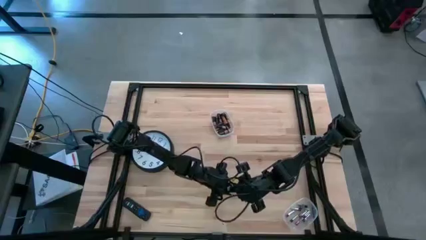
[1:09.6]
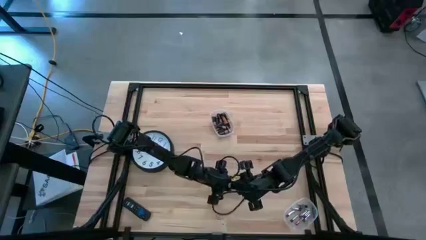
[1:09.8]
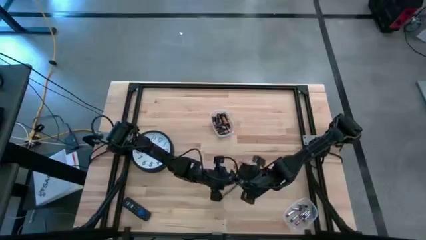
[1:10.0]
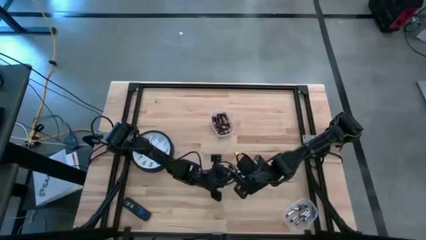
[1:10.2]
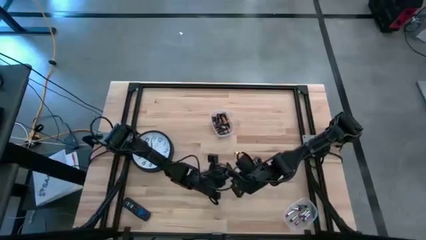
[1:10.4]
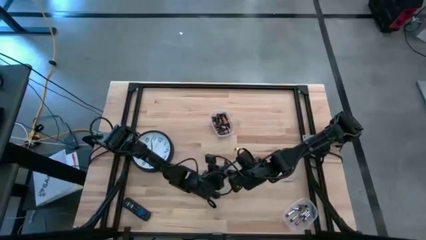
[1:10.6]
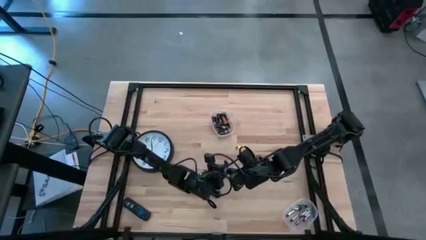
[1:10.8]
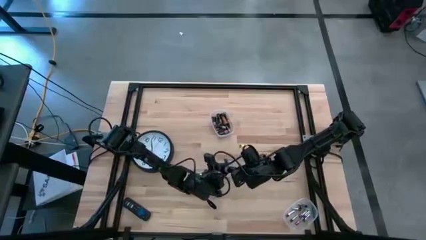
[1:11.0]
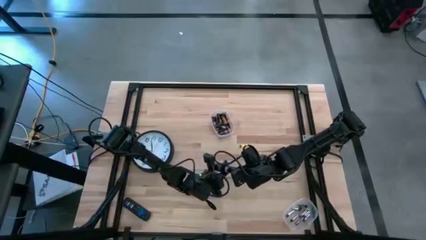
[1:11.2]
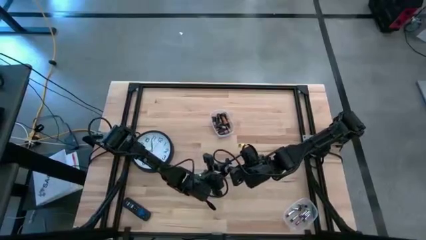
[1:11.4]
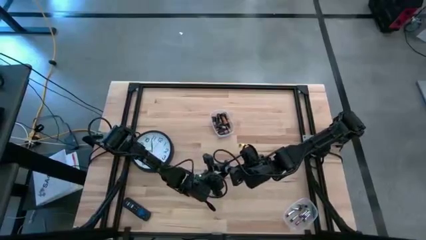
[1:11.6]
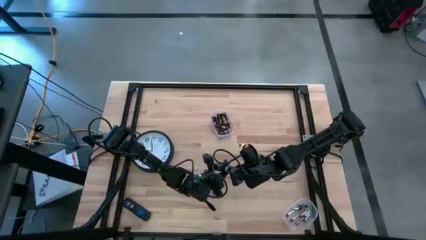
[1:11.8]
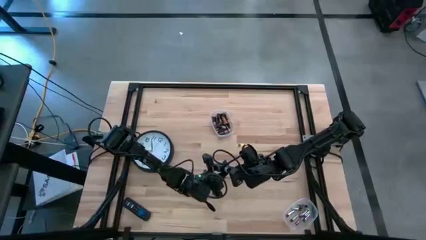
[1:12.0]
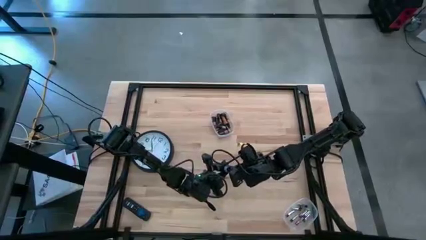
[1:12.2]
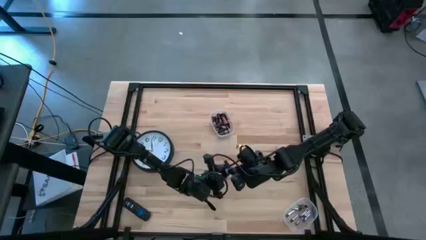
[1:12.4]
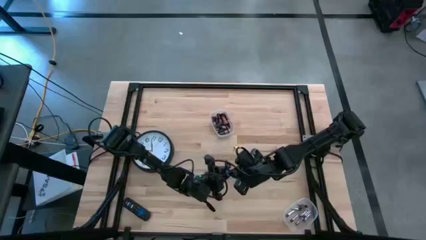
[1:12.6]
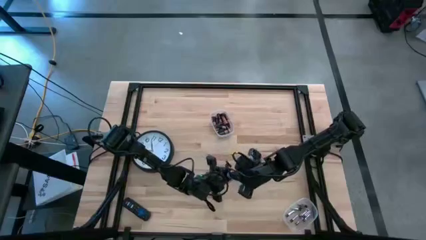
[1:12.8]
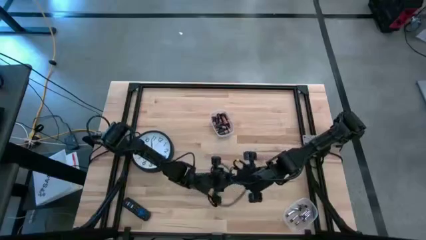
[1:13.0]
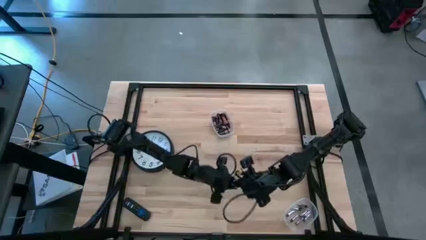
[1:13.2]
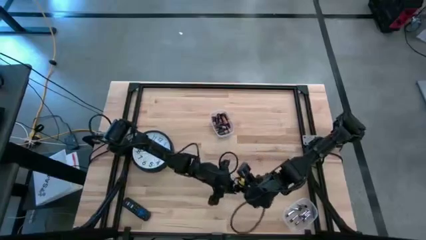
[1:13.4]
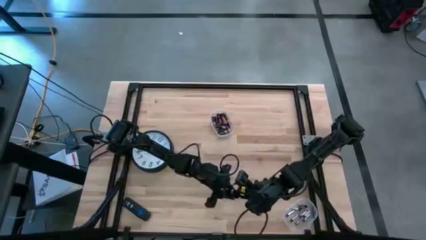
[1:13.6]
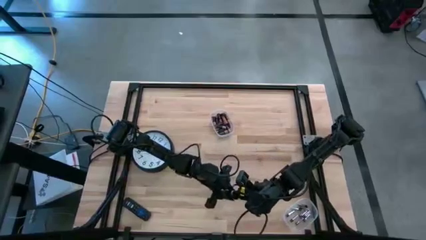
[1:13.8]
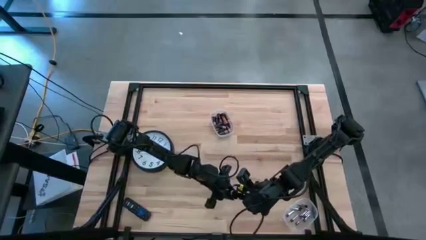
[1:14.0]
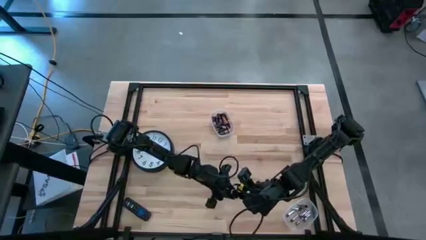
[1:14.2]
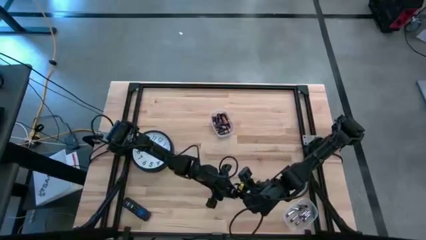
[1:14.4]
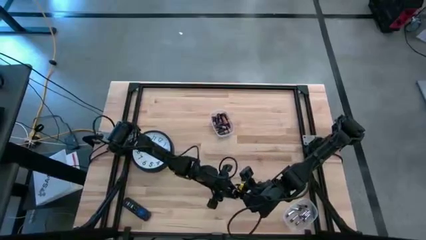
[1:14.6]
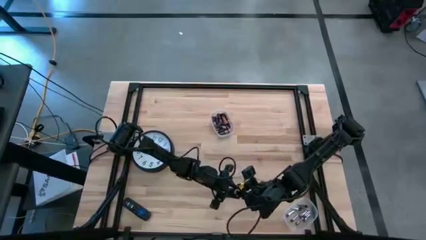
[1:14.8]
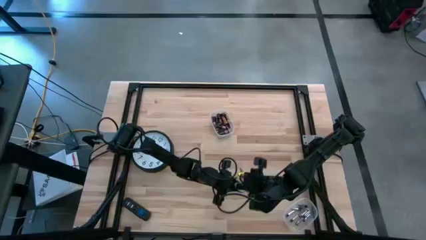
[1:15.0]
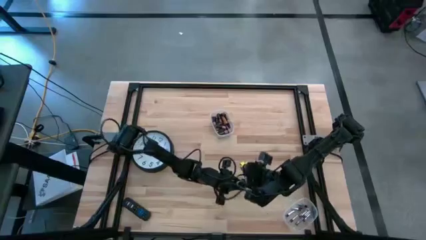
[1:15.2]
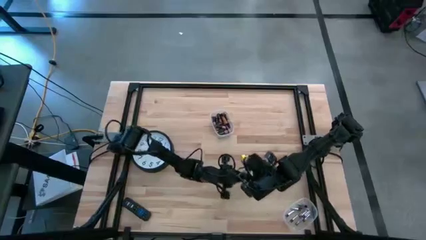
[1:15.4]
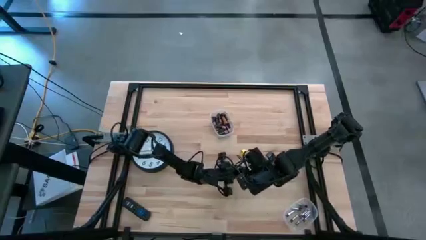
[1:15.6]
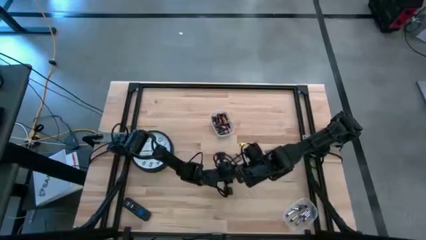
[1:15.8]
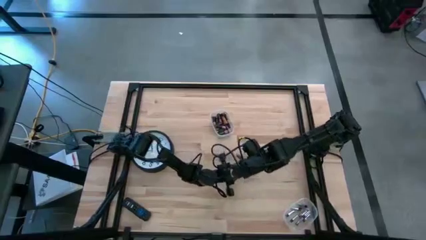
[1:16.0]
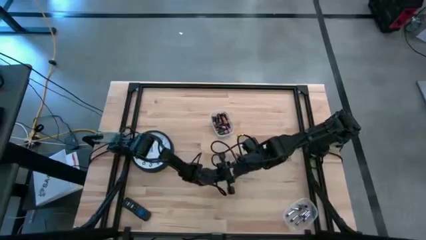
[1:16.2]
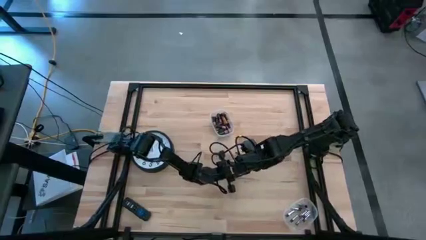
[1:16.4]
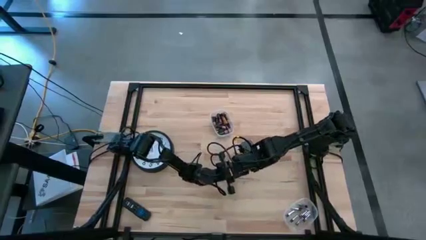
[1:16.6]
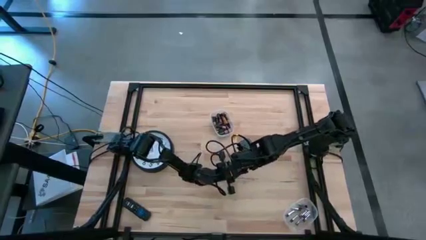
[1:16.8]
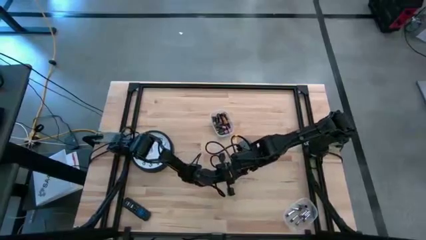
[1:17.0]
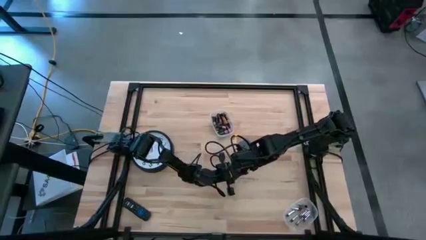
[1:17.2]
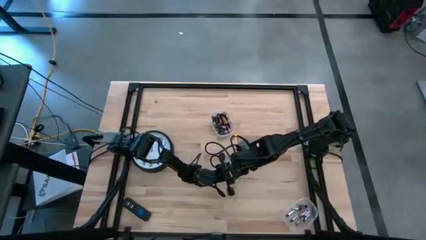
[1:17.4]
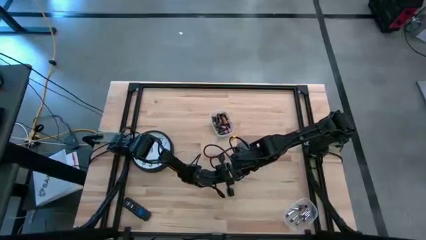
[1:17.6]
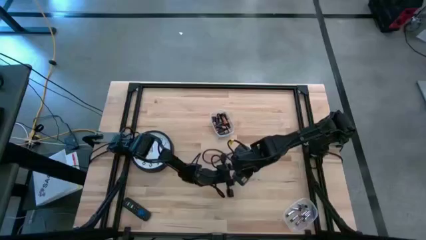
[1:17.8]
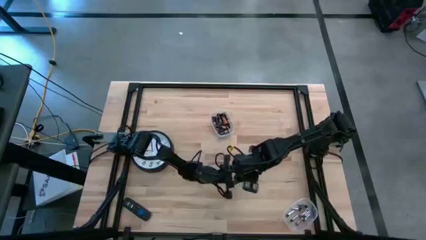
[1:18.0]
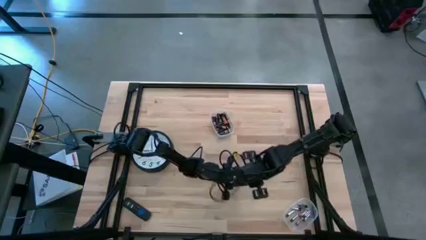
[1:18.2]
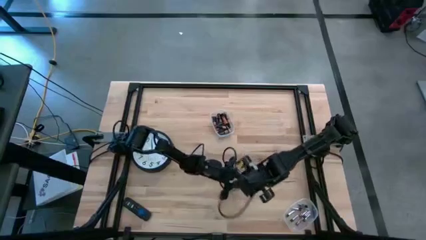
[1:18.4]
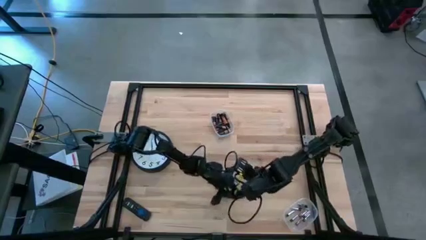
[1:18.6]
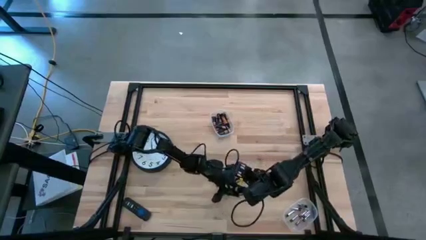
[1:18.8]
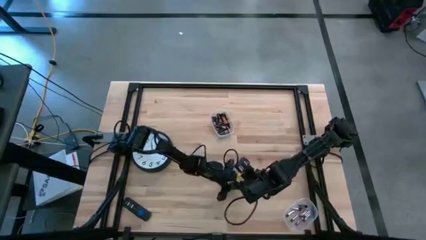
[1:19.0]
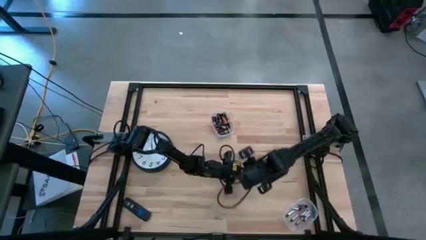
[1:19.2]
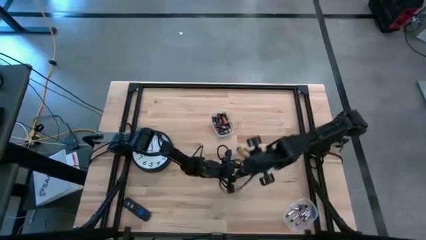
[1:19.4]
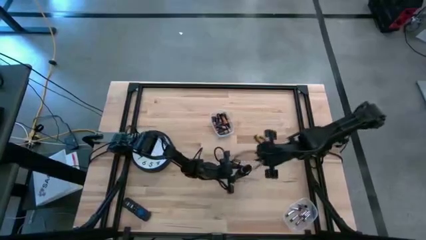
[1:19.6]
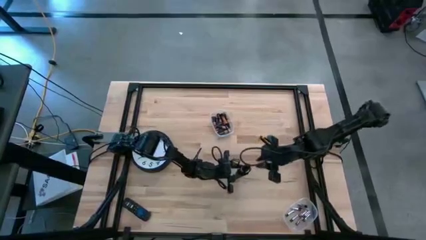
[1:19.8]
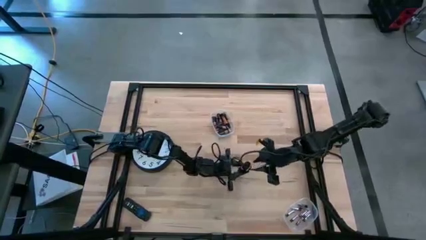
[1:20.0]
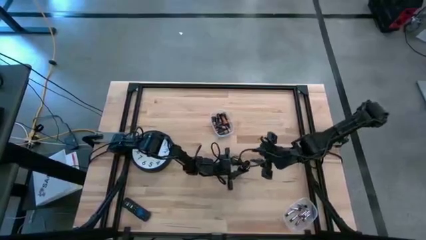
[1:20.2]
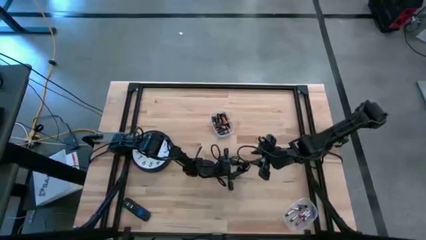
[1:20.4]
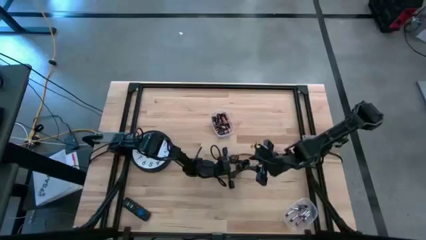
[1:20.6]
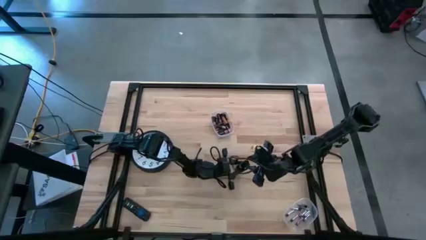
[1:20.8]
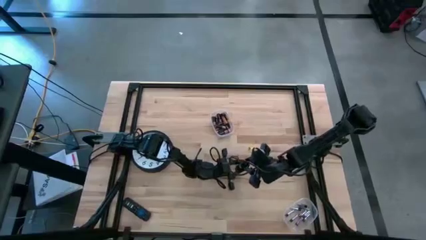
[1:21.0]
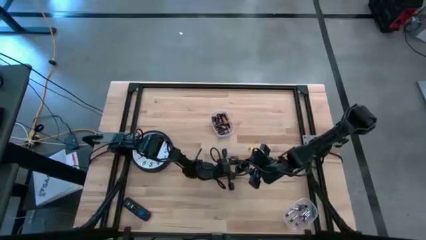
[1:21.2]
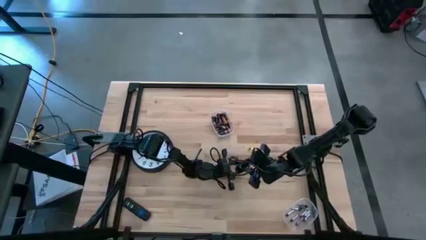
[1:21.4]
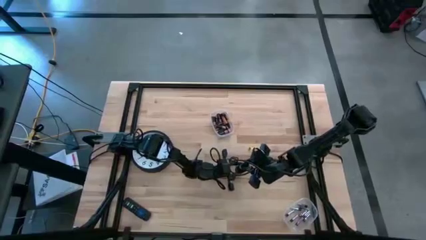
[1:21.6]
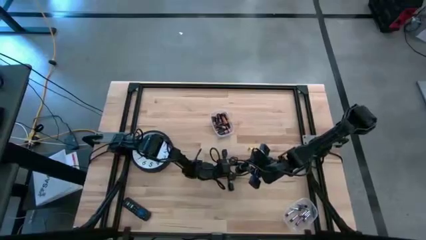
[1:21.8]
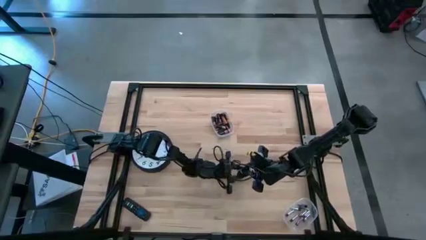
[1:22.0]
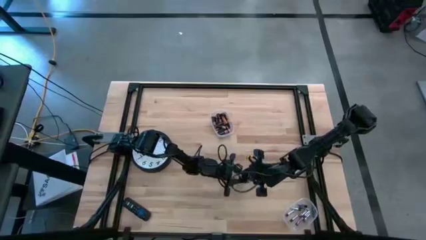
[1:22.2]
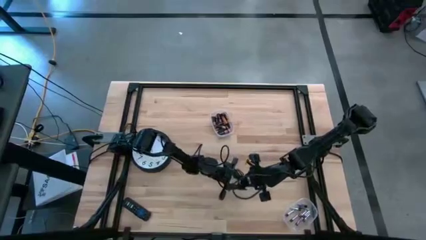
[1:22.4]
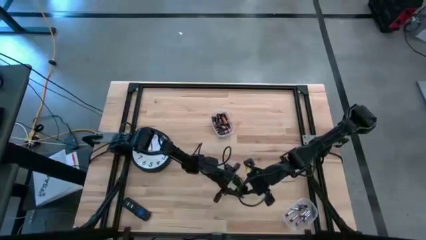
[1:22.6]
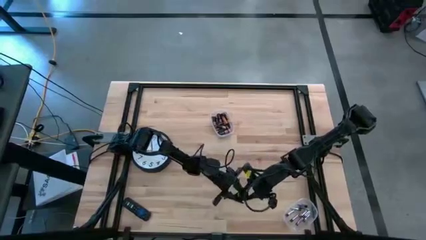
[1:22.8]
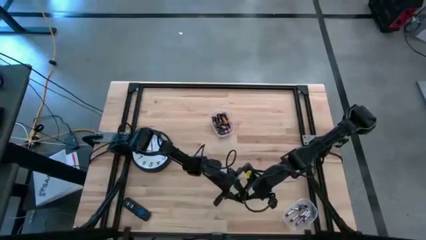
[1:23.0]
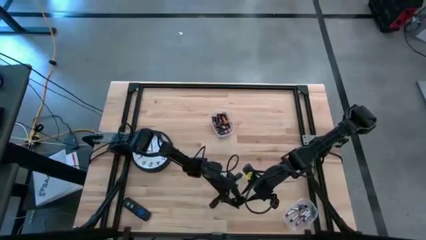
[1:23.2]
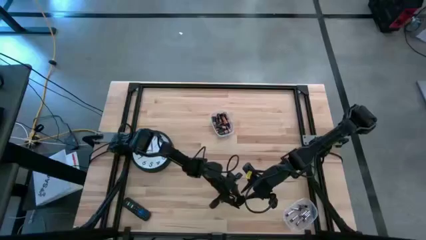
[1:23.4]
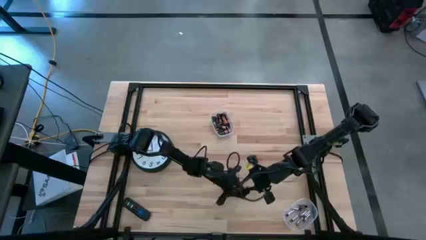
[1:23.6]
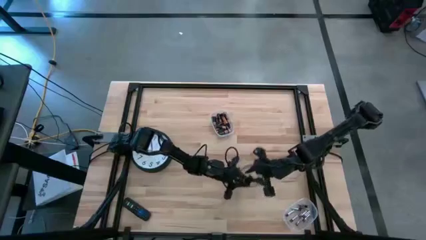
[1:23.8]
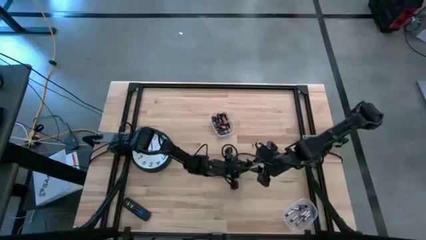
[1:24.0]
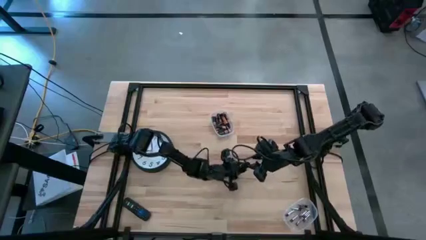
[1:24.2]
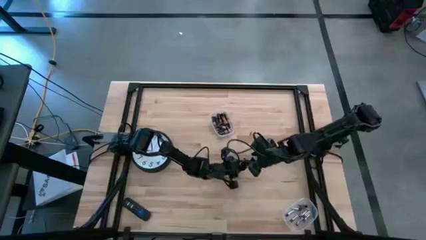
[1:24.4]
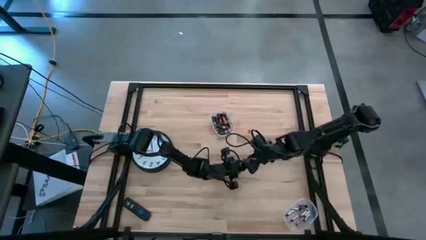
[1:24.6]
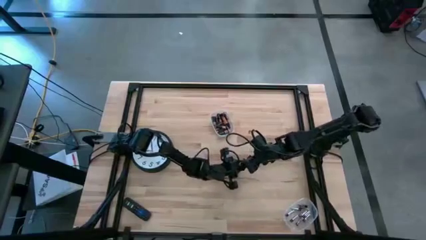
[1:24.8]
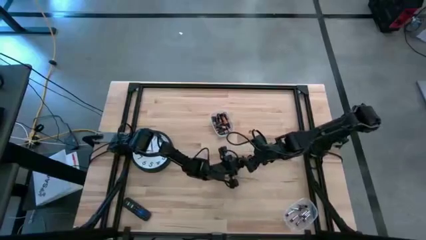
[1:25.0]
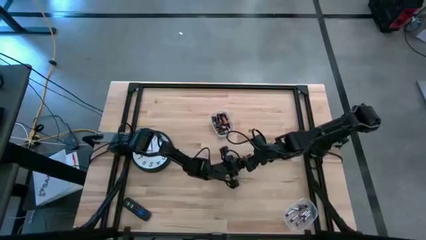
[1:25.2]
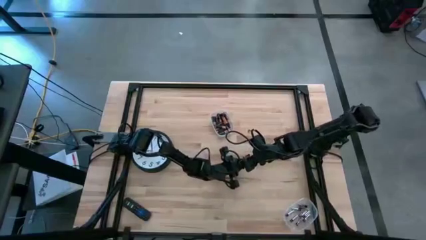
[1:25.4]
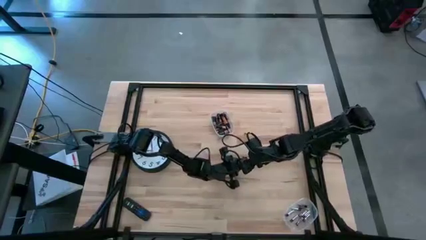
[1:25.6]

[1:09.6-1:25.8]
Task: Insert battery
Open the lid of the black flashlight
